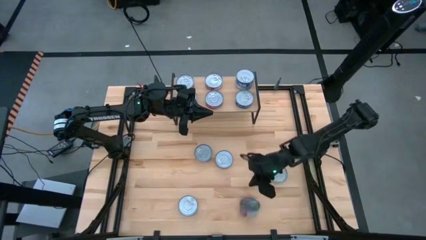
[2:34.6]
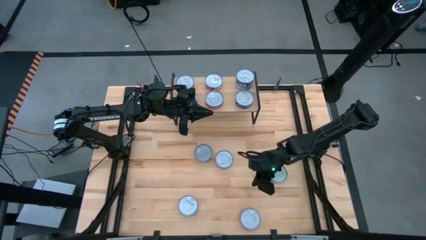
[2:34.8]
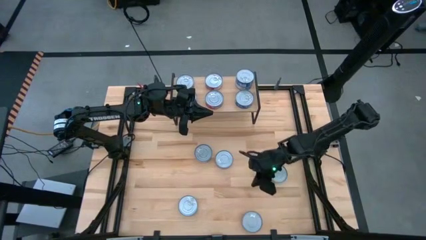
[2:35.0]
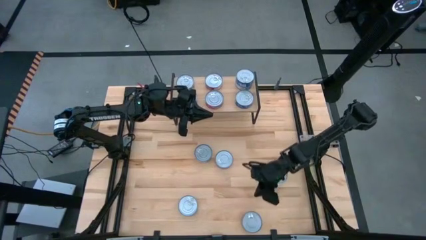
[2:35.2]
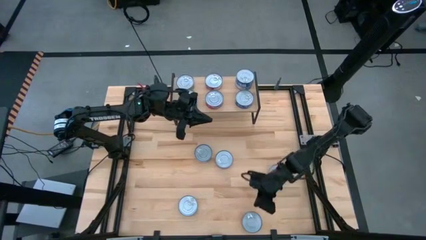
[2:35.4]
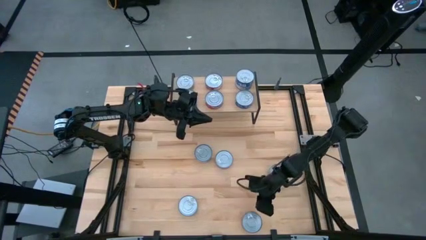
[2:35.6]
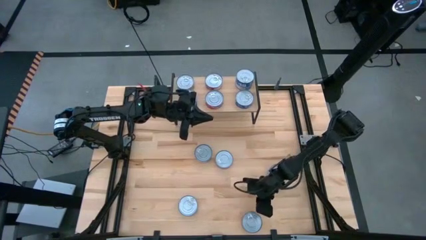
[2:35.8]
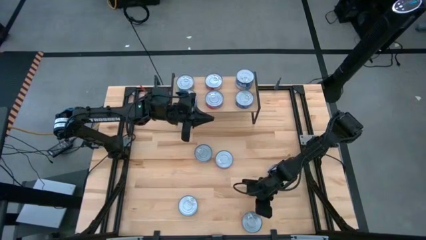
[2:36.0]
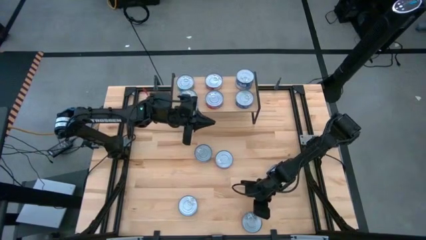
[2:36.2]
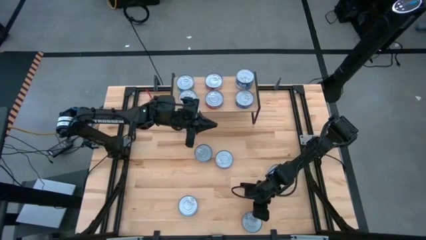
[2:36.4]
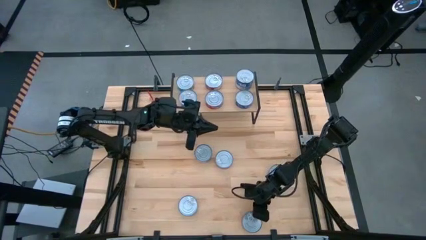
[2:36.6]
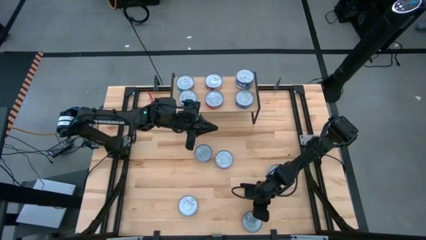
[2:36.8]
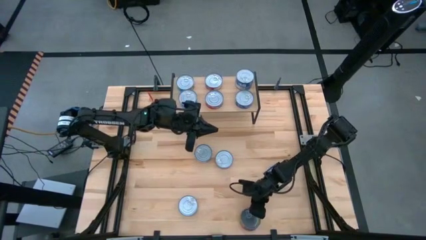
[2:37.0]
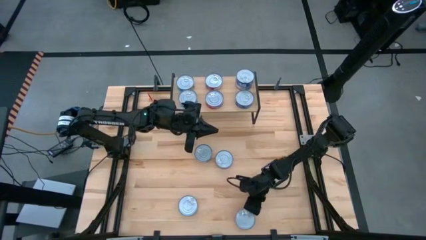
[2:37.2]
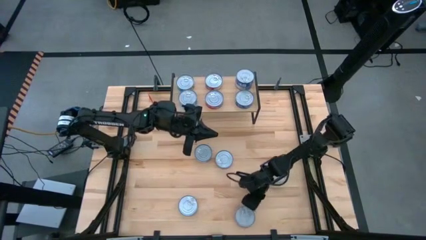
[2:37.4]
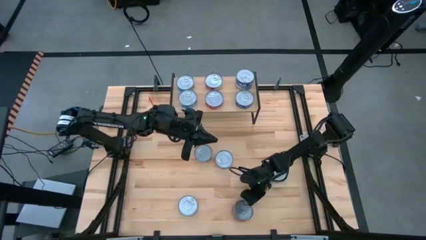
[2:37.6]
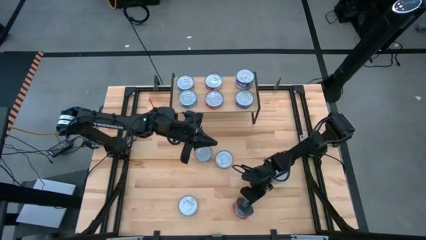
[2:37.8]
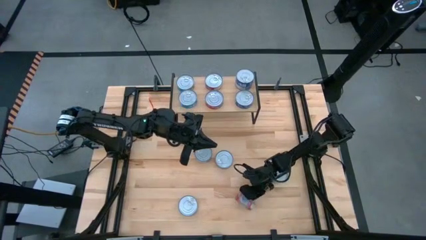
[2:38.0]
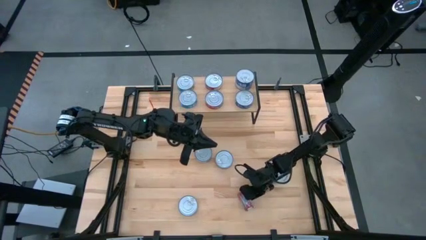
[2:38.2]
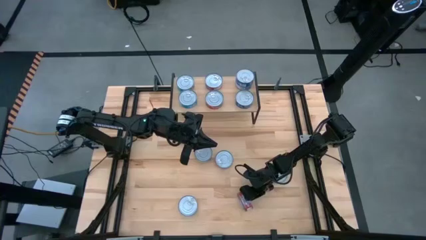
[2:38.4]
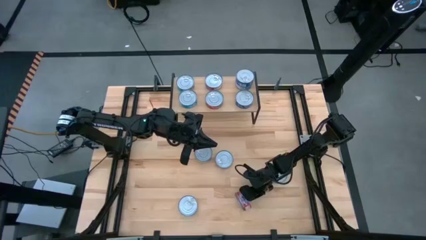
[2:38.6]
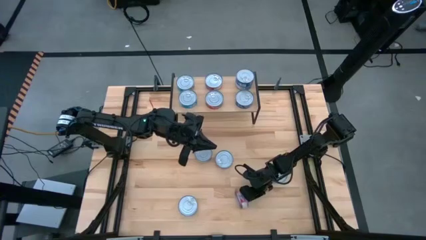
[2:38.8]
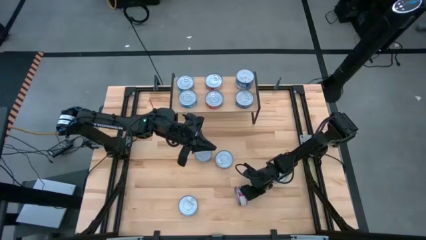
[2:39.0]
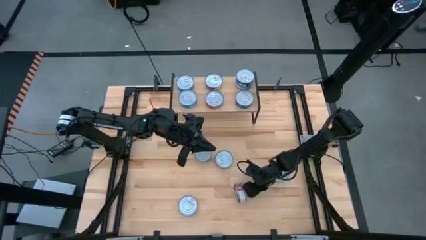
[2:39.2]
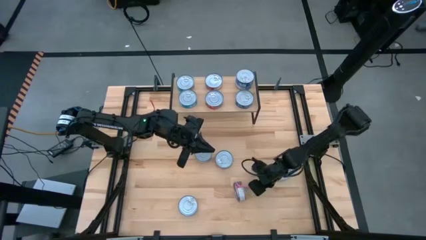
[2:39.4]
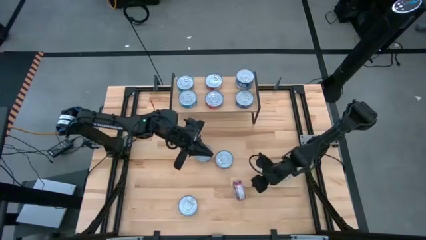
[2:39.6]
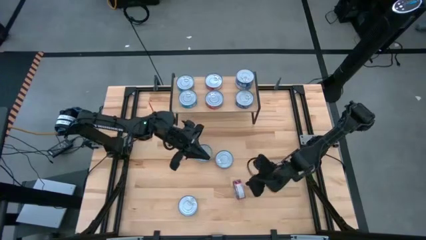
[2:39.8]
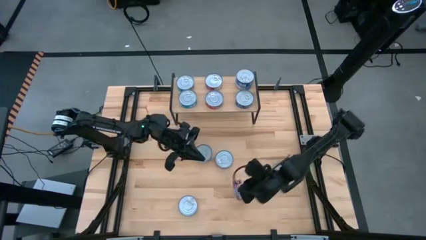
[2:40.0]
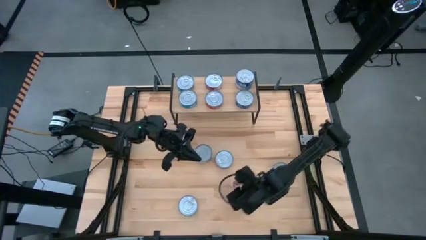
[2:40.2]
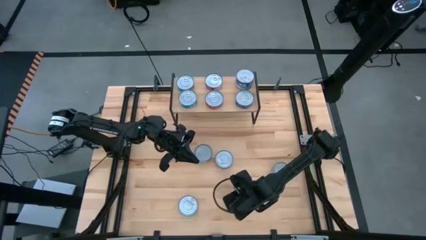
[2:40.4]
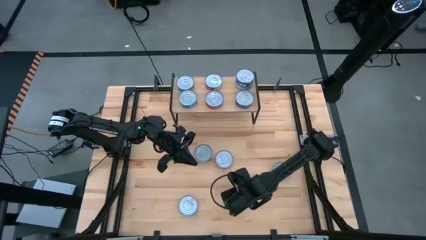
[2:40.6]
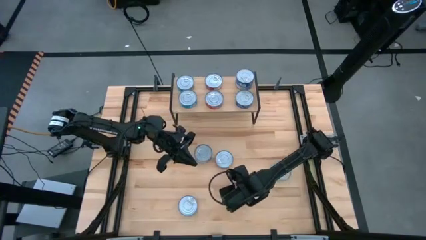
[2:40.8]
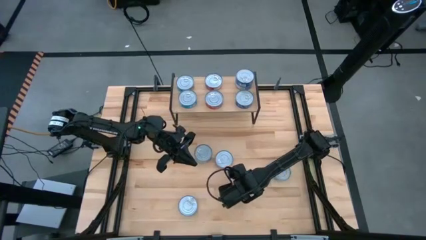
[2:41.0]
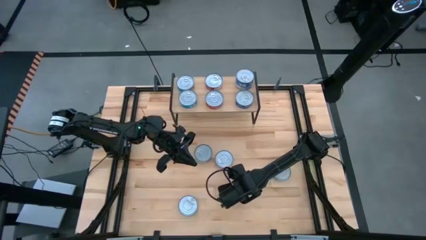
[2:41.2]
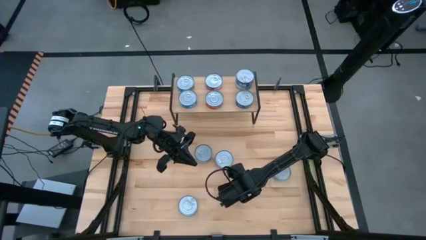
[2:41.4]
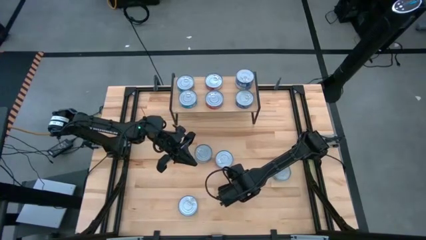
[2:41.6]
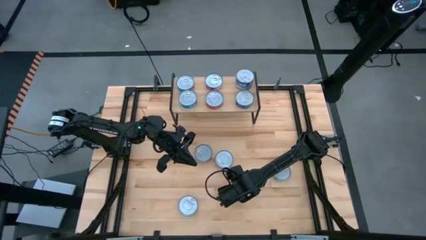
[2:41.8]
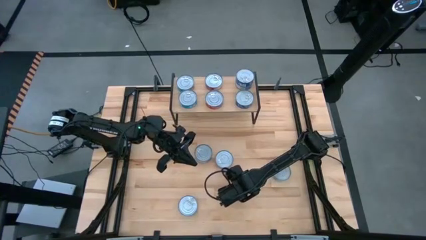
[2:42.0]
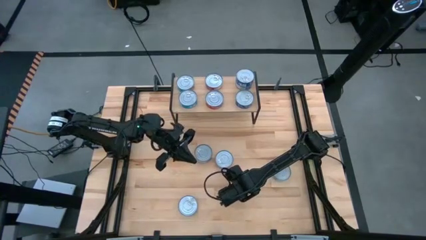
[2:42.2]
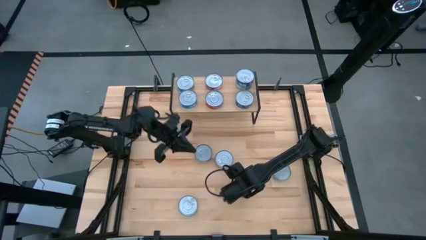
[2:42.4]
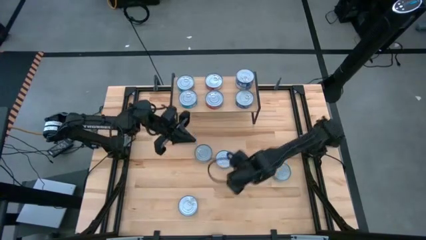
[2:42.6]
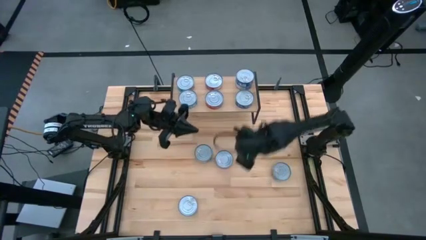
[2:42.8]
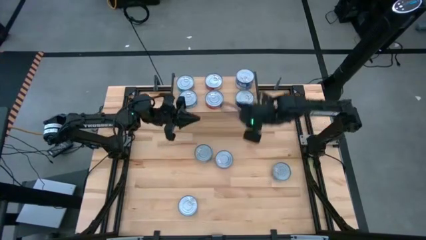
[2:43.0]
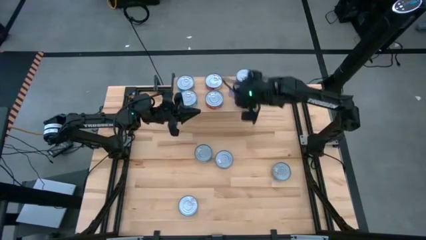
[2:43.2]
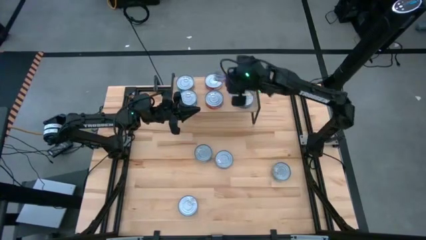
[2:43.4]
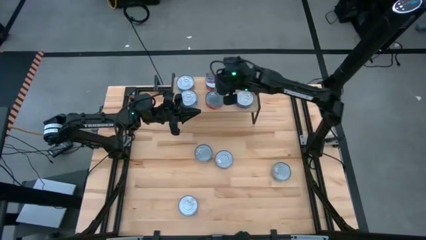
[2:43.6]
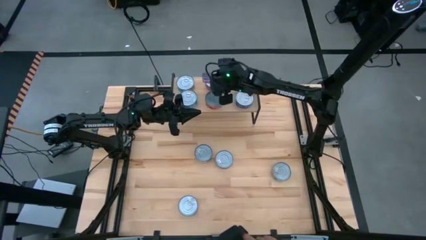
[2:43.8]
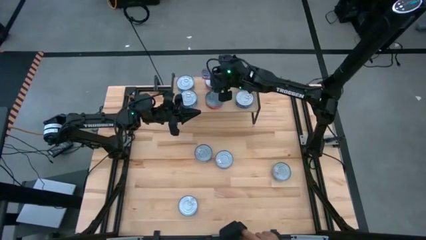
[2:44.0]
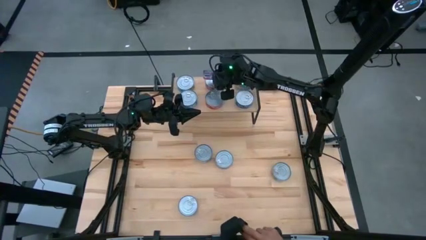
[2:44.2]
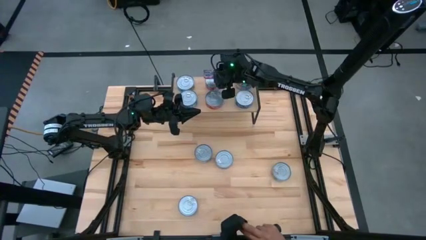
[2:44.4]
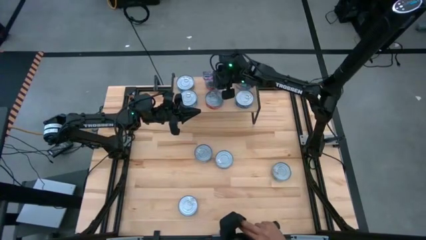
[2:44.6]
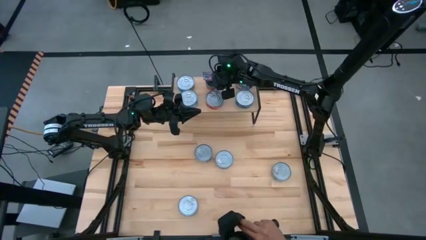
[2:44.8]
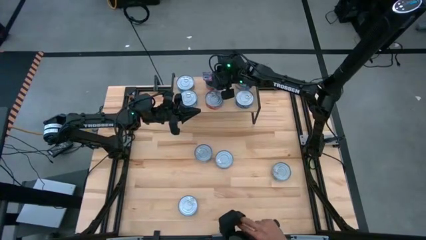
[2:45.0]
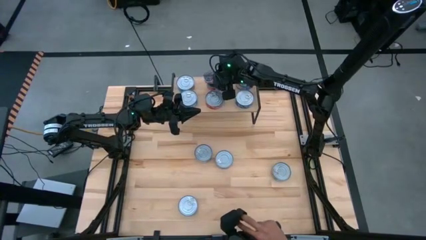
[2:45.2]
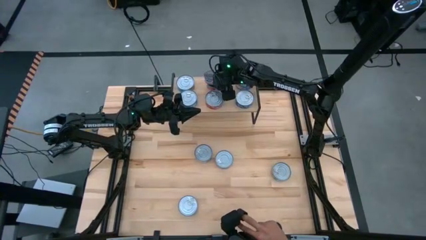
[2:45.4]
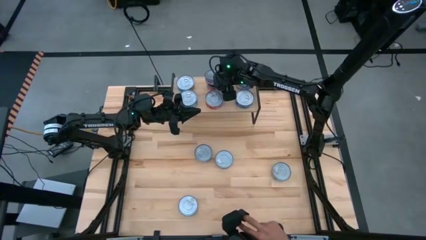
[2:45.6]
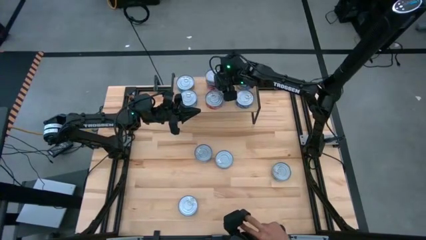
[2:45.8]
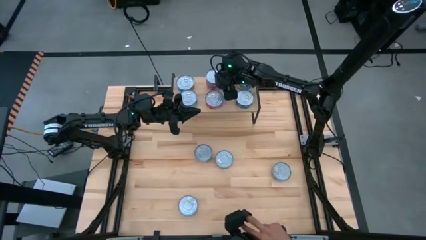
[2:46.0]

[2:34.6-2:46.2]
Task: Stack canned seafood by type on shelf
Stack the top red tuna can on top of the other red tuna can on the shelf

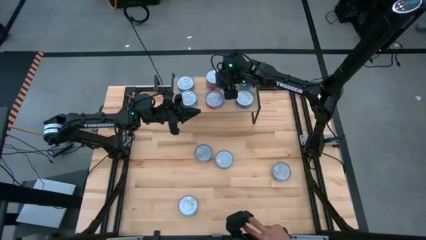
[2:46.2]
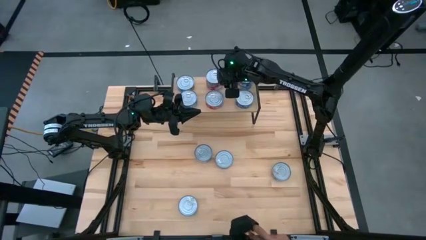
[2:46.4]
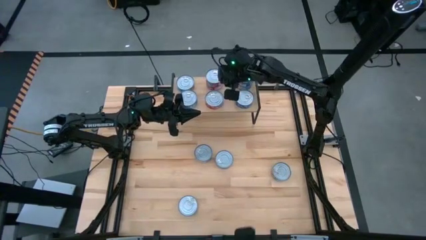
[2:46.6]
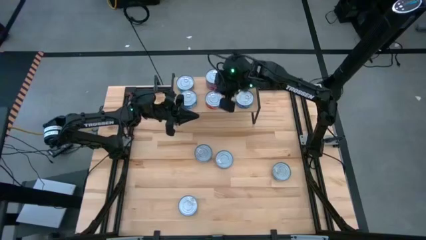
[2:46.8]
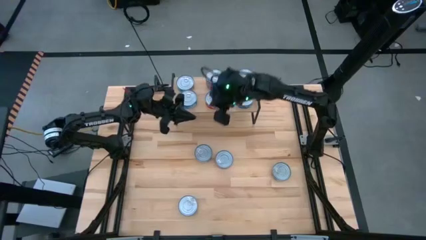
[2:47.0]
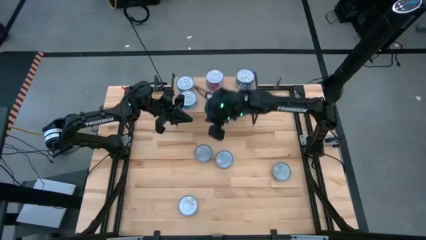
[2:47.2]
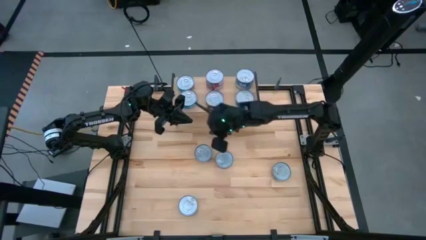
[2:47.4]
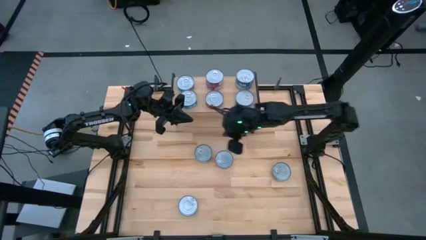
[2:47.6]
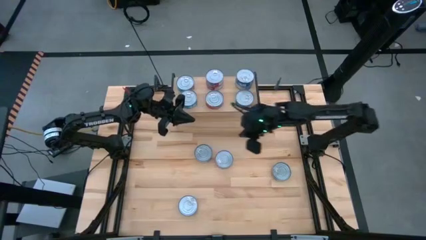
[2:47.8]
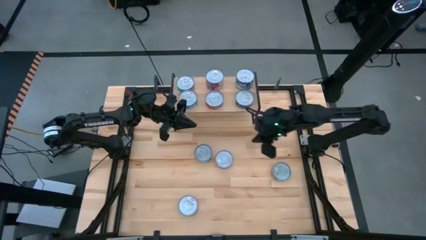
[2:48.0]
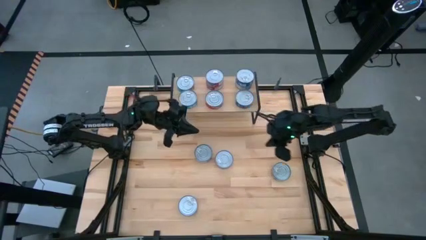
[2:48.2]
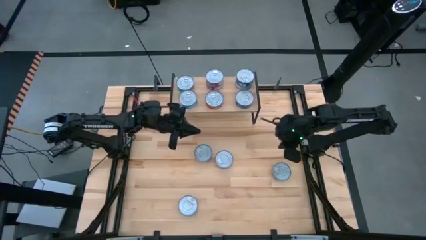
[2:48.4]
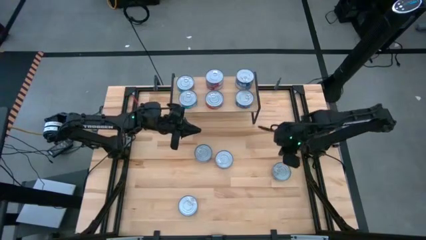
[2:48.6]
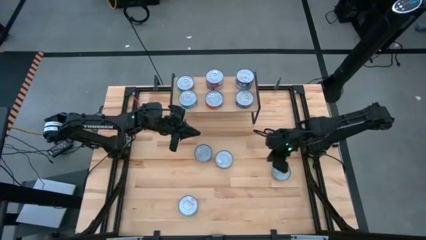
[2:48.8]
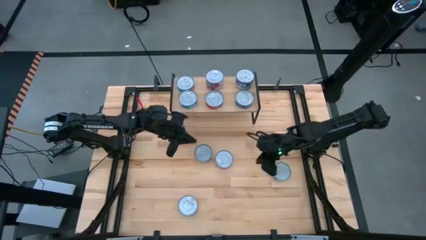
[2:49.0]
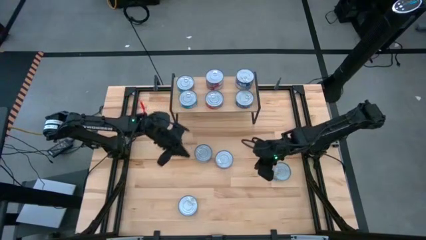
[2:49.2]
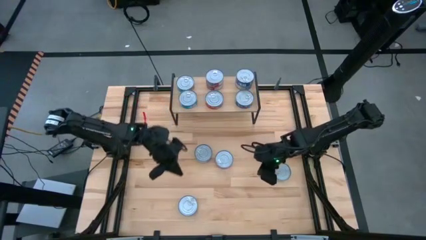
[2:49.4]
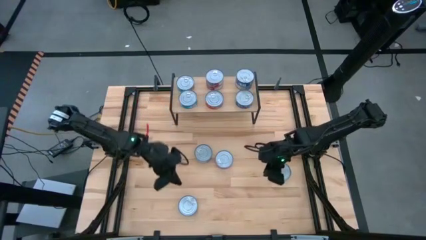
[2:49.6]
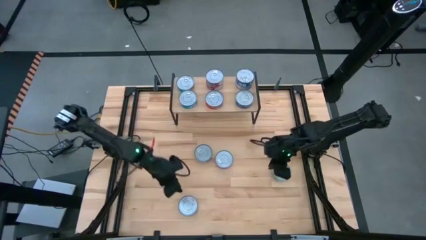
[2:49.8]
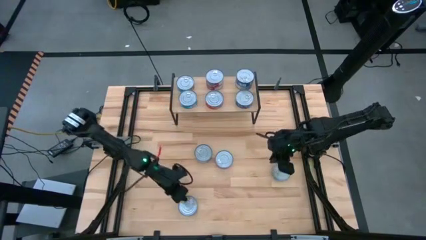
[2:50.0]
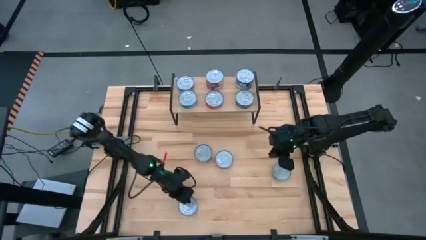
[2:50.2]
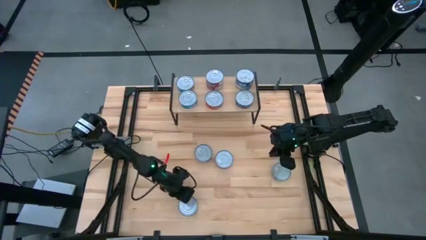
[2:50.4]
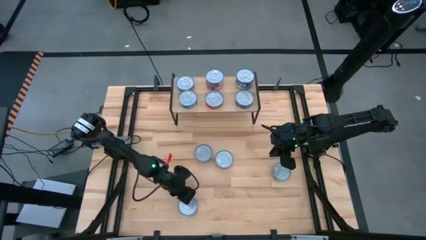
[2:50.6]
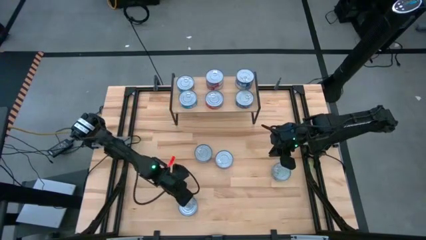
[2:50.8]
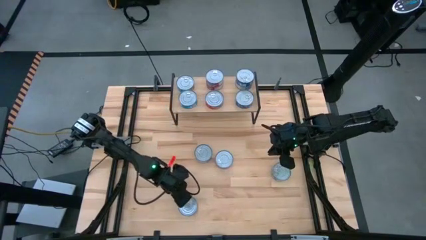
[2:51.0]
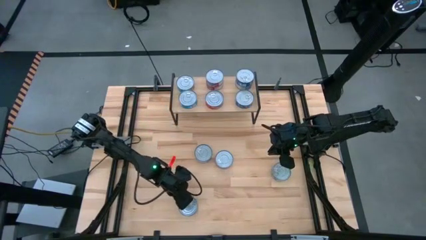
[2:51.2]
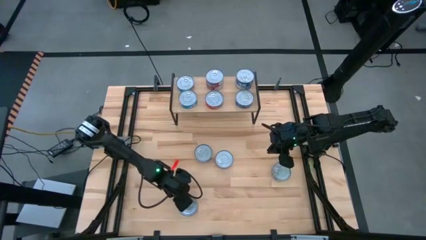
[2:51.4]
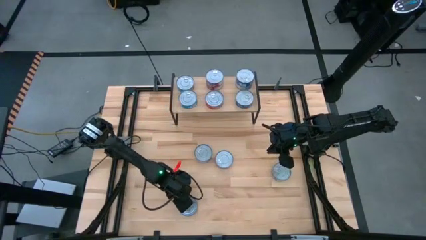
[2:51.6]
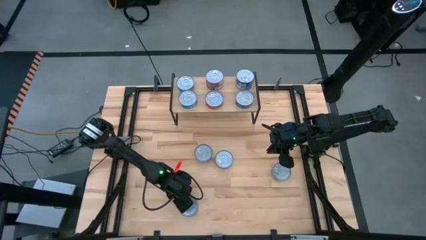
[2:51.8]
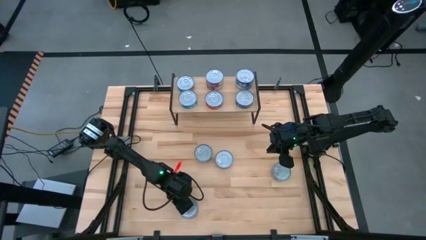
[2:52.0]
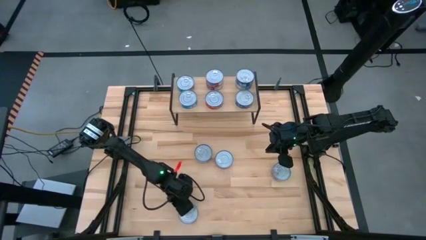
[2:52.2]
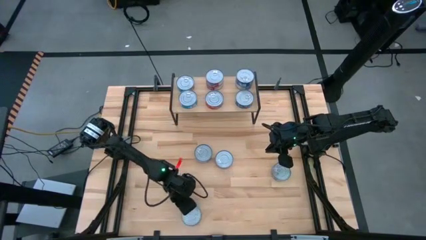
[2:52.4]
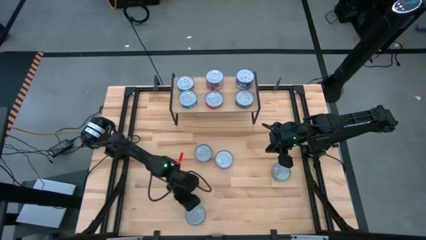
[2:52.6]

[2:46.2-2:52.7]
Stack the bottom yellow and blue tuna can on top of the other yellow and blue tuna can on the shelf
